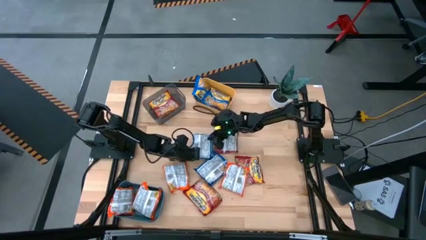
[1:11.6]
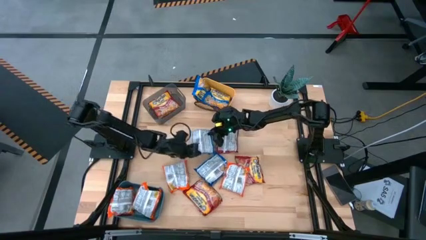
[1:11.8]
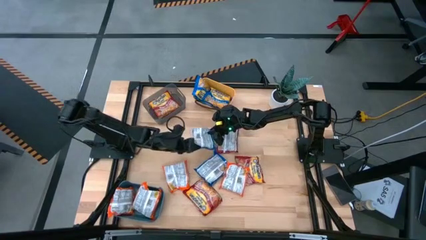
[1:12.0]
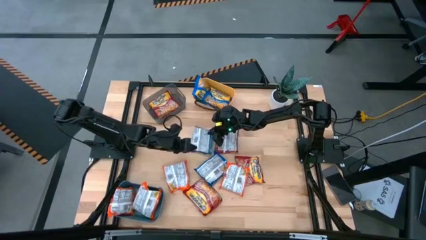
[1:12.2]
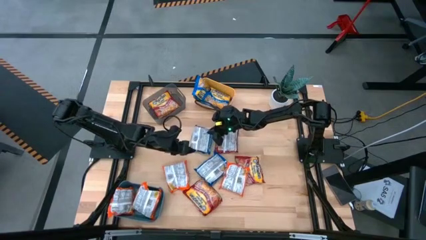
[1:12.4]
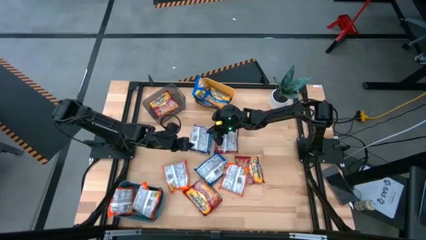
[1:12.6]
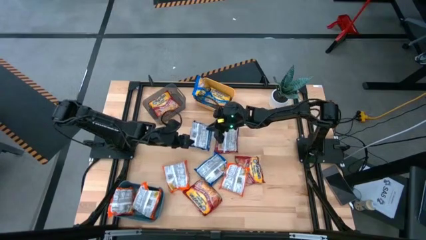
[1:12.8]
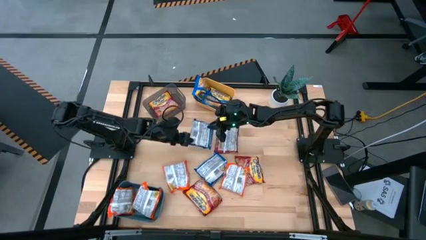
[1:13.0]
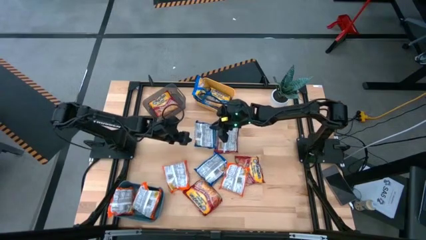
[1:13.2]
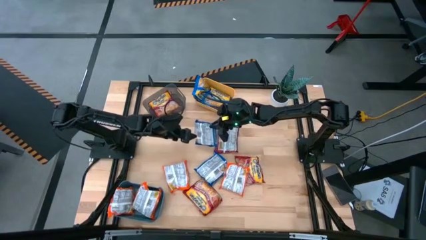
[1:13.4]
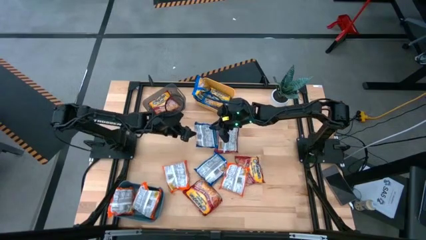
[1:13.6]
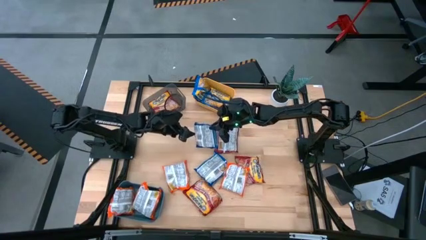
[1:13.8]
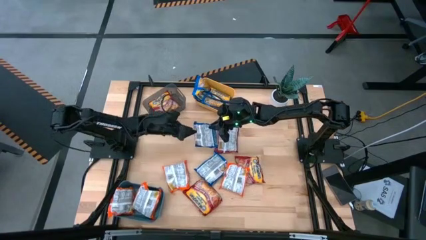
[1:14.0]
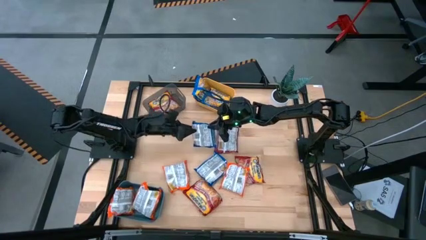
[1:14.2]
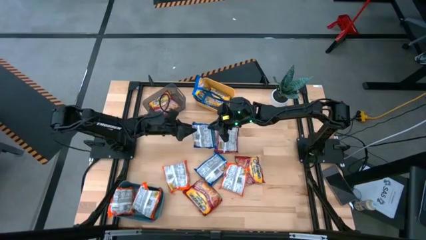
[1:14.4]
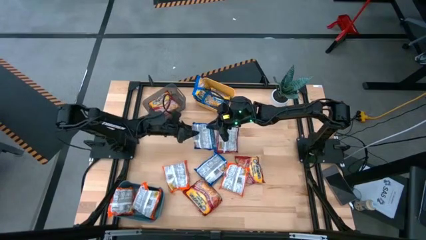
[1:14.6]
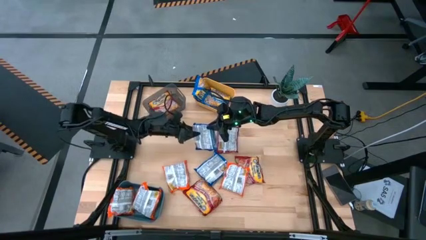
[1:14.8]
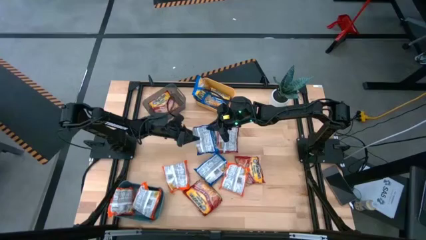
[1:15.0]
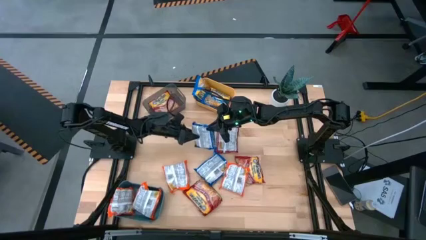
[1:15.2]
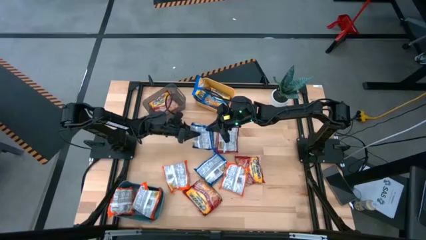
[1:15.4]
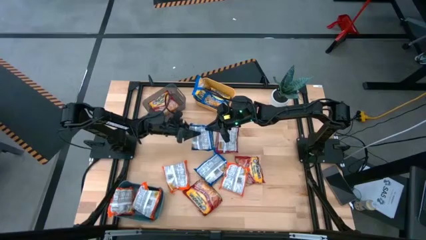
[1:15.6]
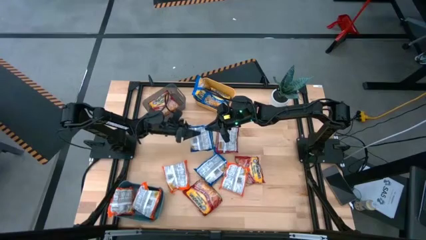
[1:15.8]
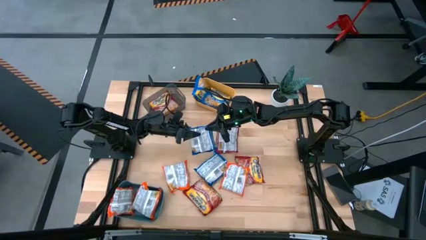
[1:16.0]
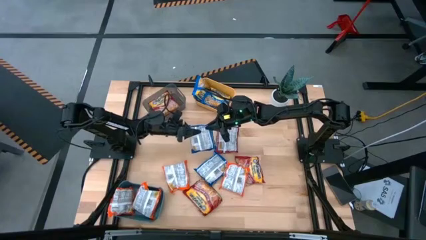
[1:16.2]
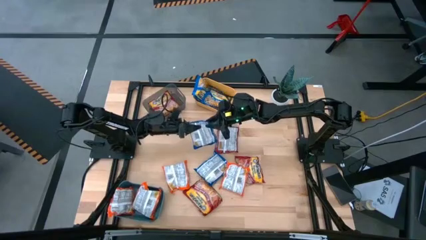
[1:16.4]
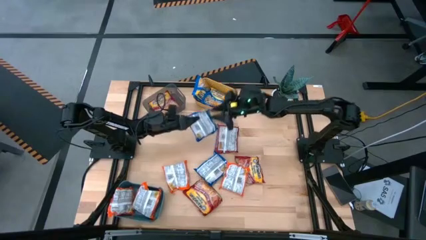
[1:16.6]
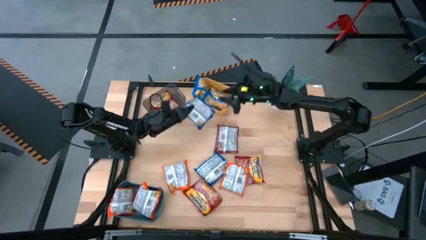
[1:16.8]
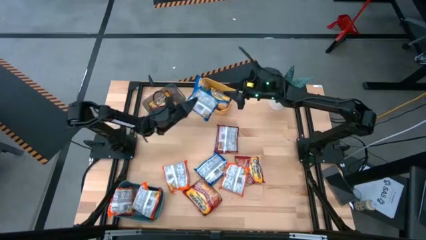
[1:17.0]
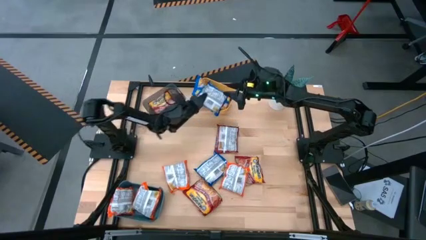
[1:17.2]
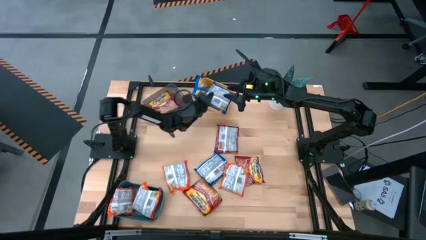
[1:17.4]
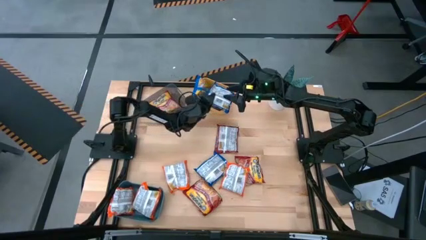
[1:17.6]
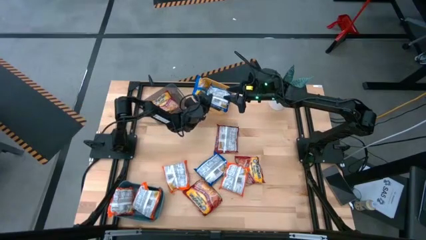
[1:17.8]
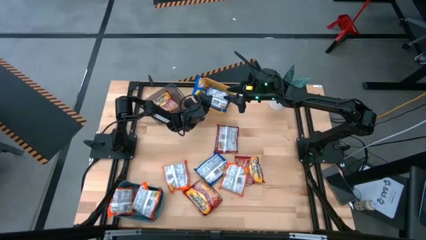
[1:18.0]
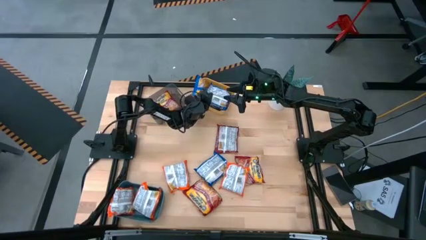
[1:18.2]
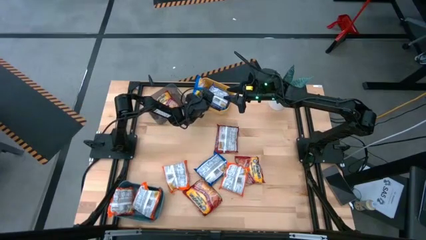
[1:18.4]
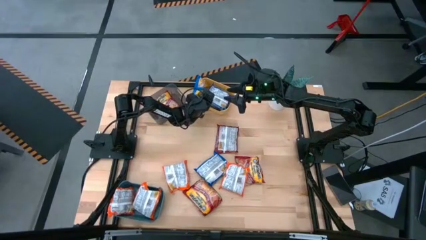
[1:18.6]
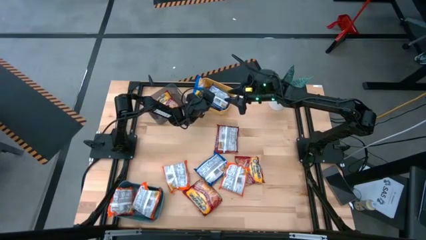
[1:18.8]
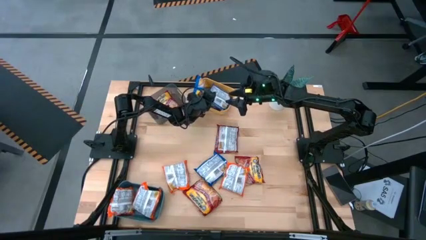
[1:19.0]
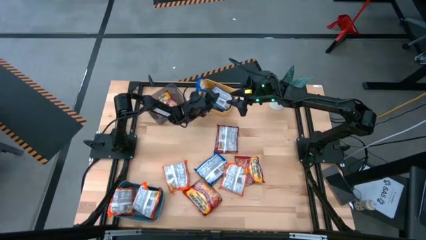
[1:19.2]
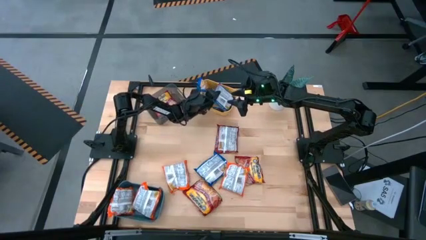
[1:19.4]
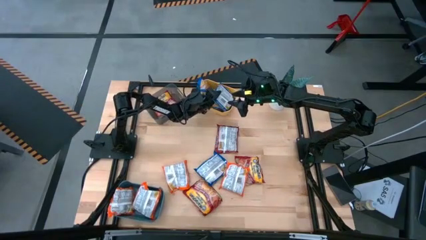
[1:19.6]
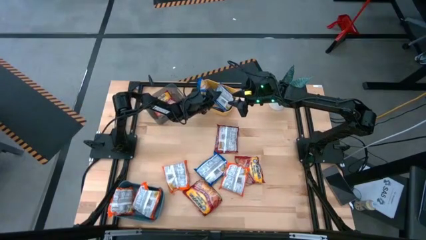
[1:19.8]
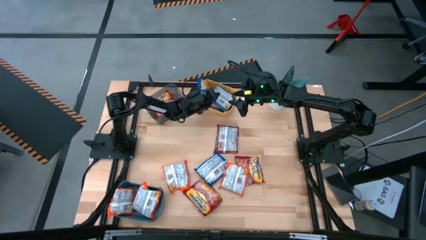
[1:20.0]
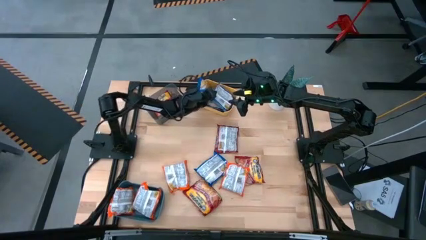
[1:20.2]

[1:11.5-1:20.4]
Task: Sort Maruchan noodles
Put the blue noodle pack into the yellow bin

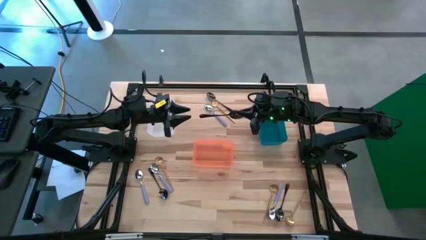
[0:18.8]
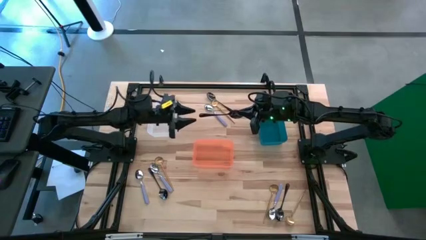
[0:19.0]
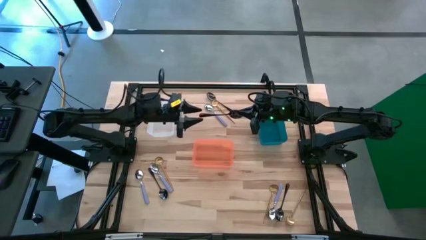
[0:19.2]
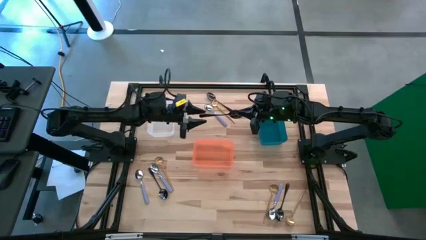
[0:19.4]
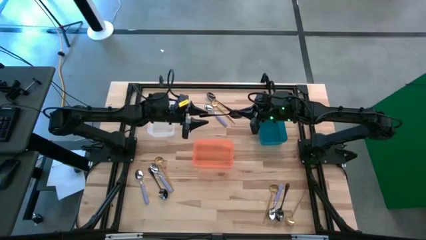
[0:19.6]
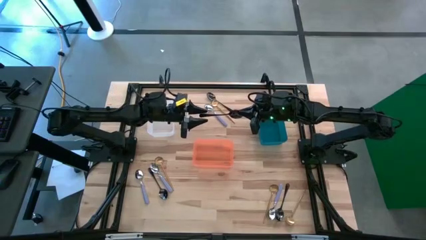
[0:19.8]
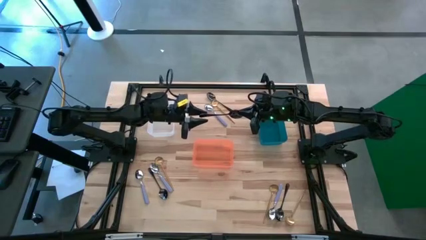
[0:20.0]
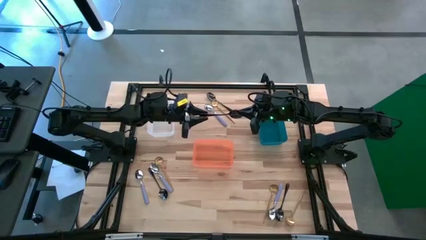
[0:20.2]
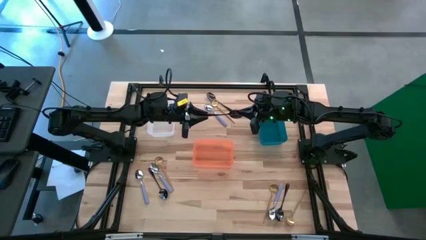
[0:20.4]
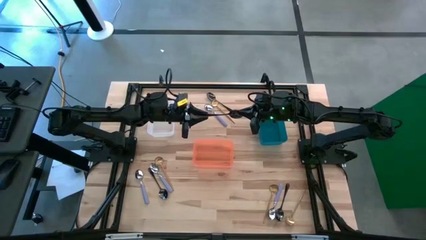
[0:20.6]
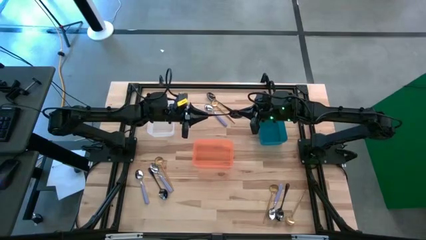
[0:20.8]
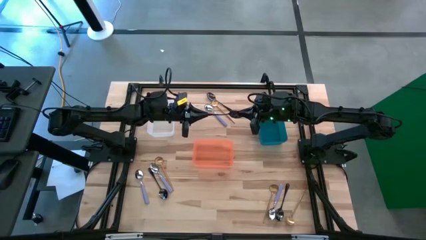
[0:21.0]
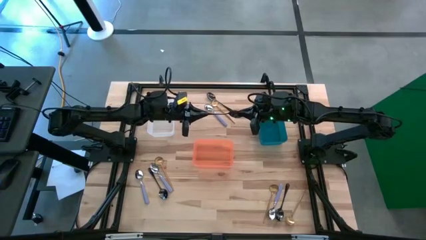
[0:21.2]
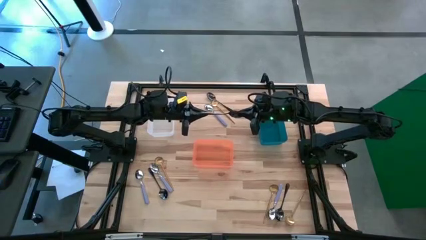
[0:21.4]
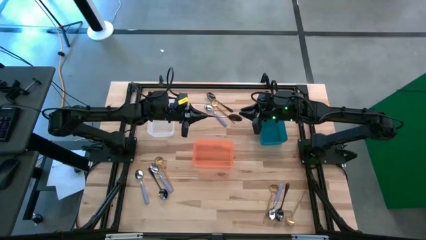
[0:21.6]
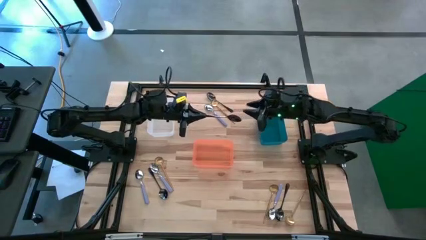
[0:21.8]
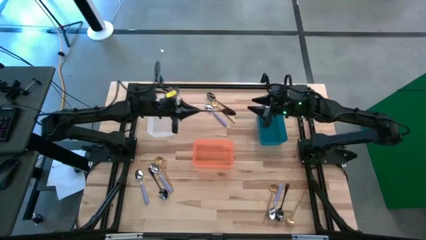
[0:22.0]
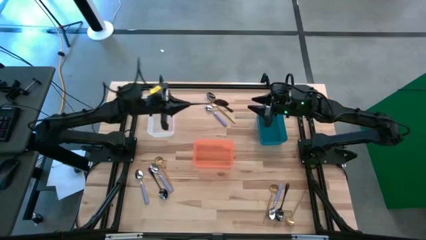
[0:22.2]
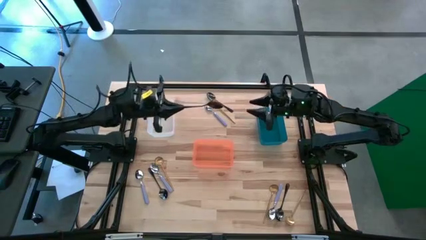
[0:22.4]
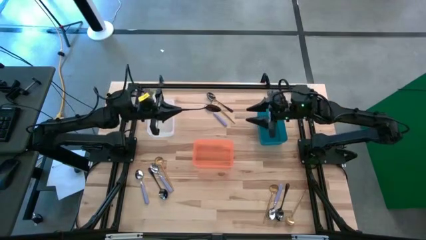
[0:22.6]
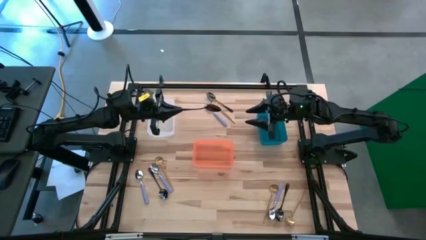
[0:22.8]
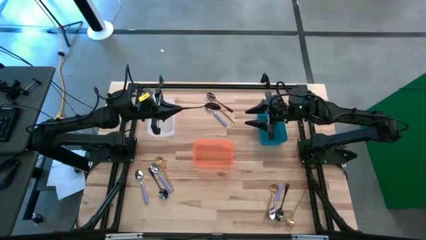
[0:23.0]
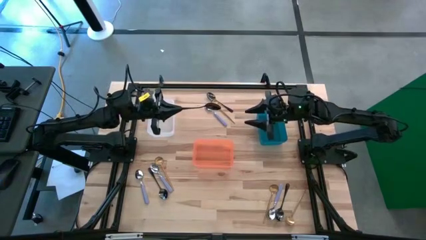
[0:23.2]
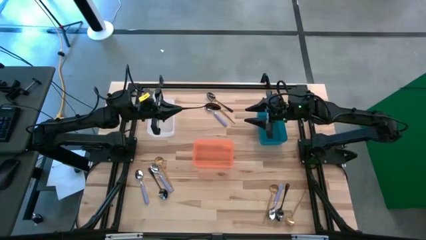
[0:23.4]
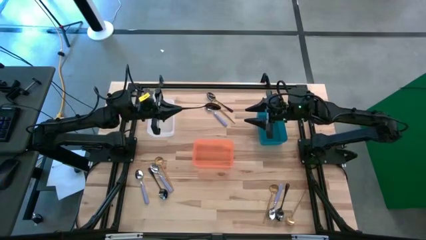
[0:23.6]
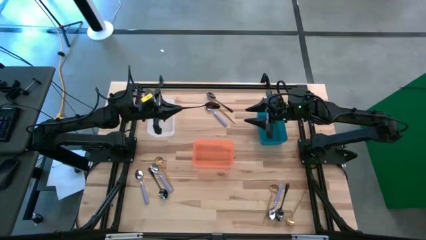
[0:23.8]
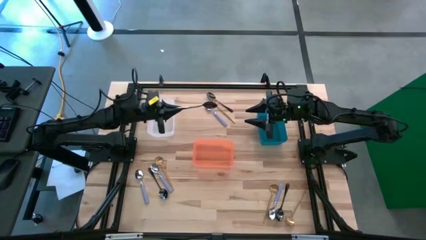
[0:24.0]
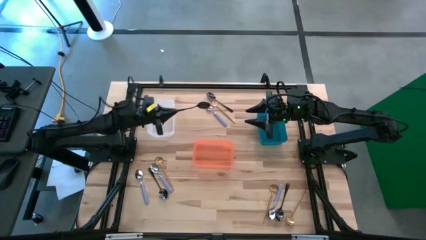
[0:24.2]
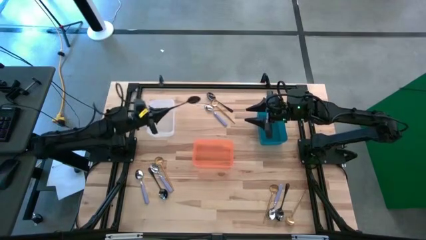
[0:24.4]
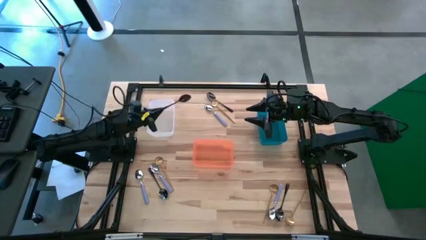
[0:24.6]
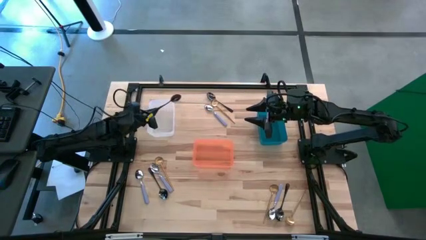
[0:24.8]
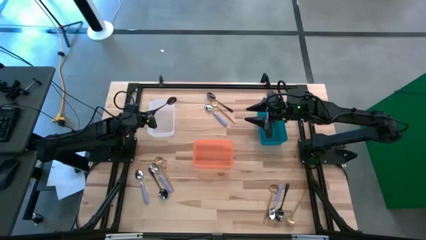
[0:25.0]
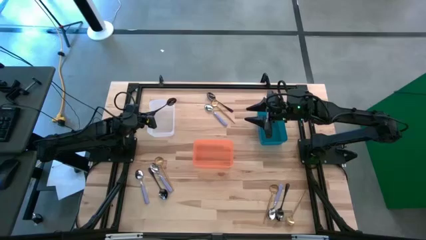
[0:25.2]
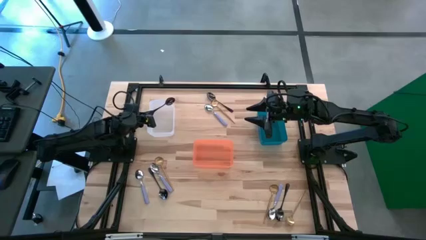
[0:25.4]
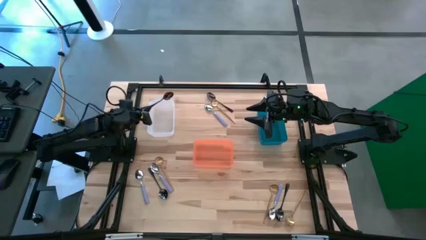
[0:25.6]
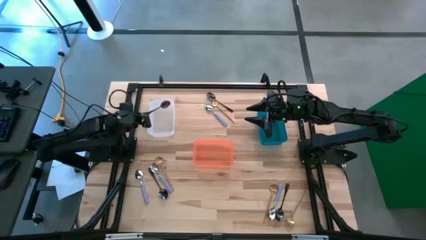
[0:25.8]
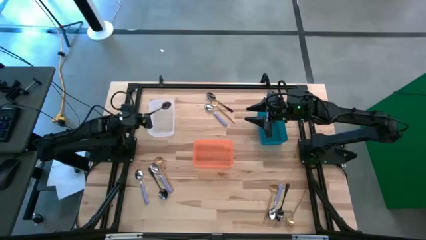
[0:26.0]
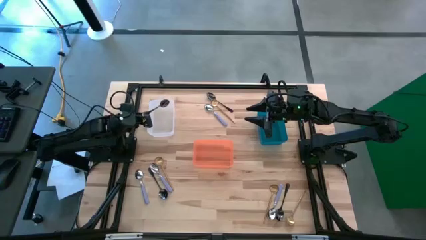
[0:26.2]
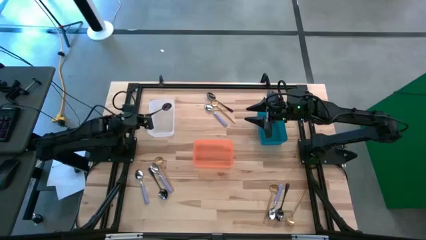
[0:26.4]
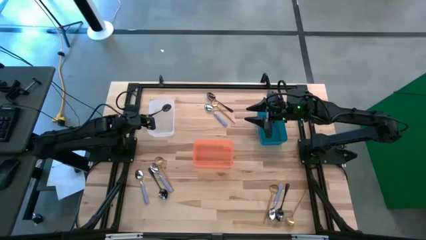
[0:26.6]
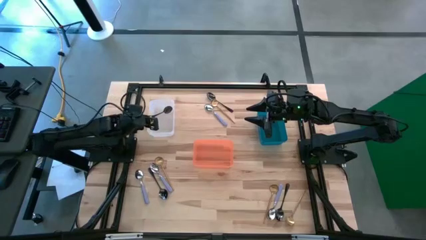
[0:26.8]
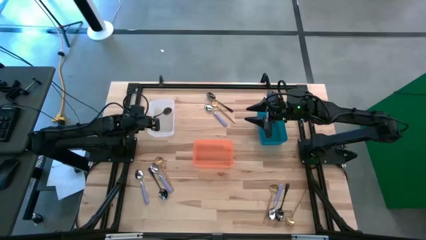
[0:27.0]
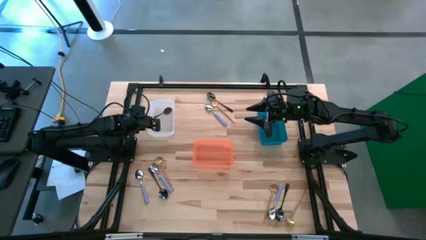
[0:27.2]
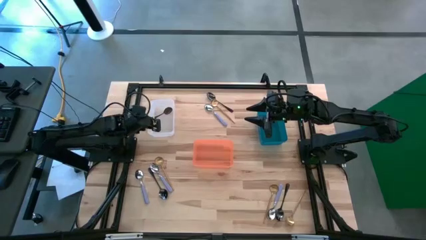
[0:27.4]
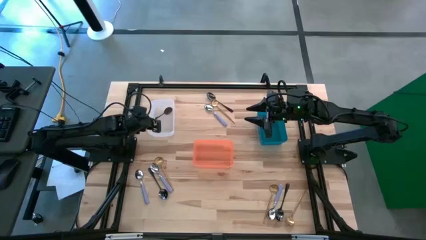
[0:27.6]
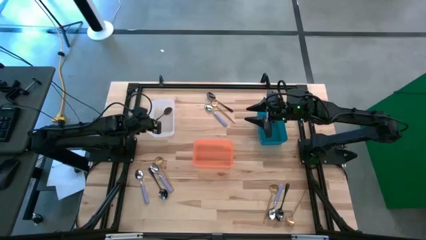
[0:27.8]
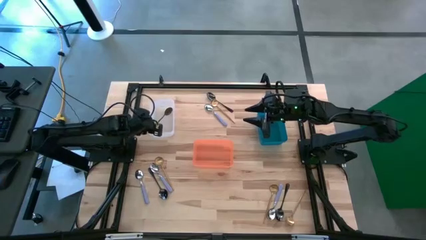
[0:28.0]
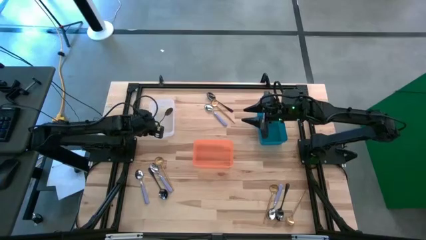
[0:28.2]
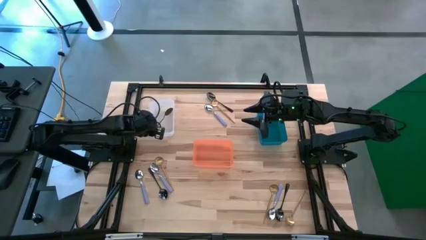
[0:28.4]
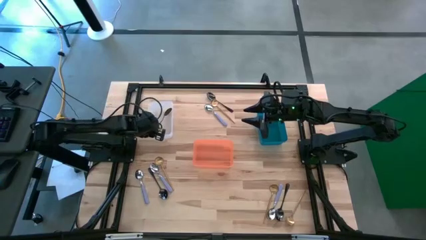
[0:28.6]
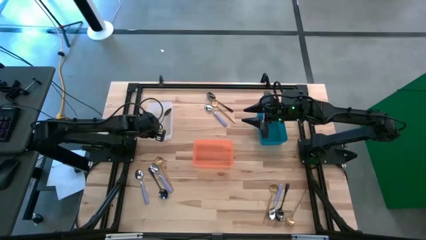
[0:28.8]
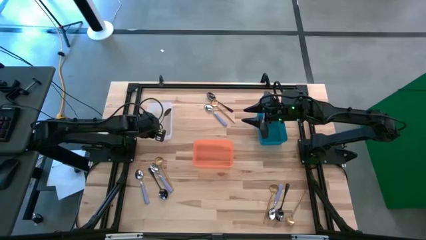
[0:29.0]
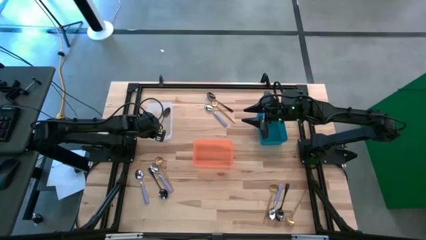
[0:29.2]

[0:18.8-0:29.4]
Task: Sort silverware by color (type)
Put the top center black spoon into the white bin
